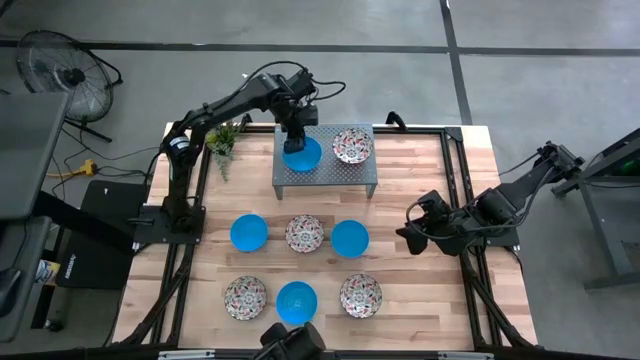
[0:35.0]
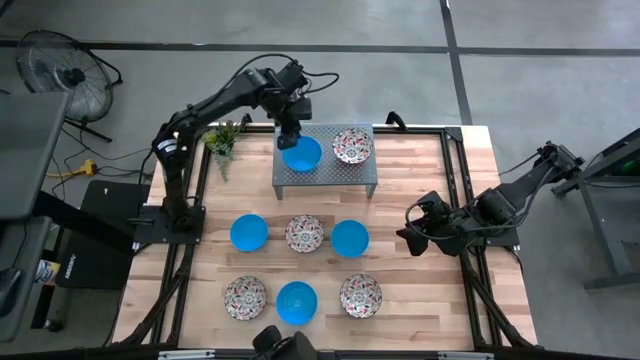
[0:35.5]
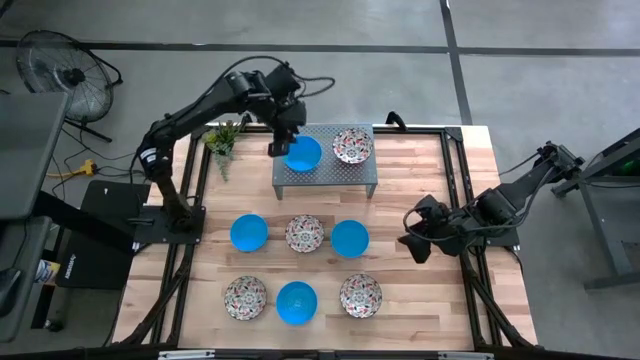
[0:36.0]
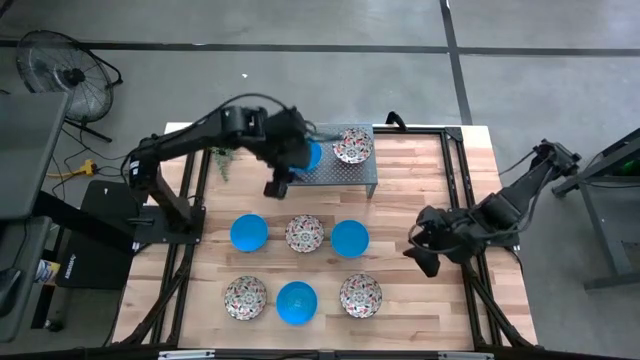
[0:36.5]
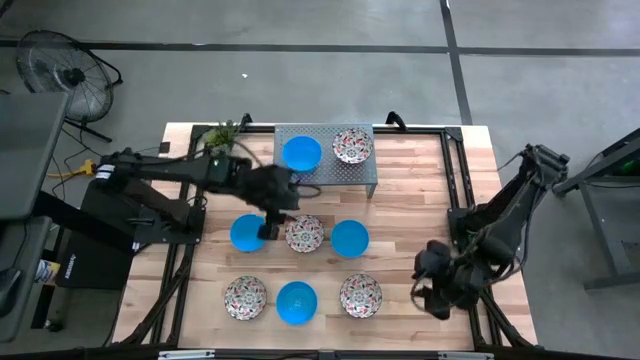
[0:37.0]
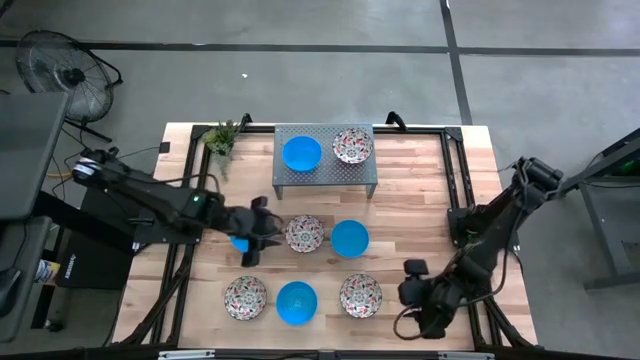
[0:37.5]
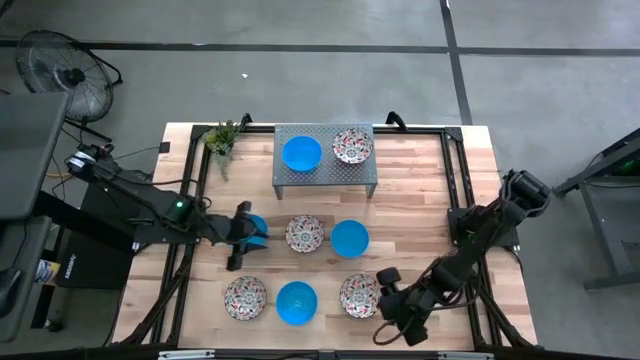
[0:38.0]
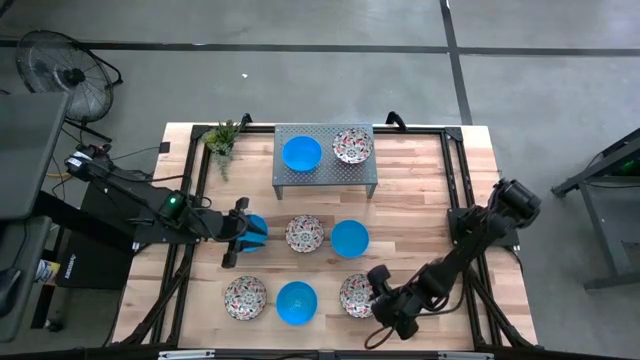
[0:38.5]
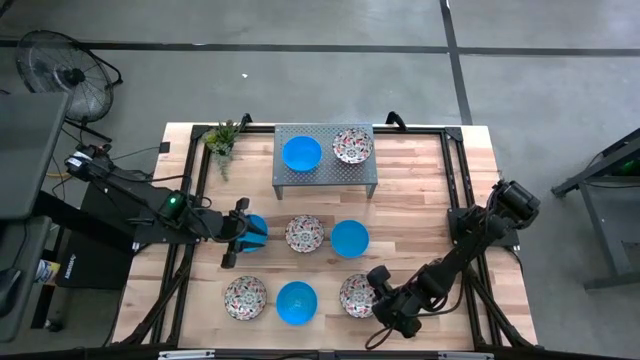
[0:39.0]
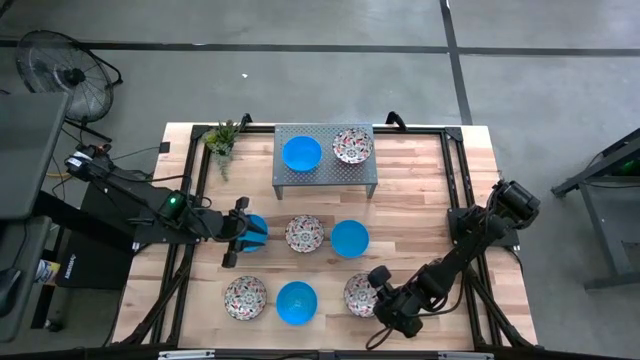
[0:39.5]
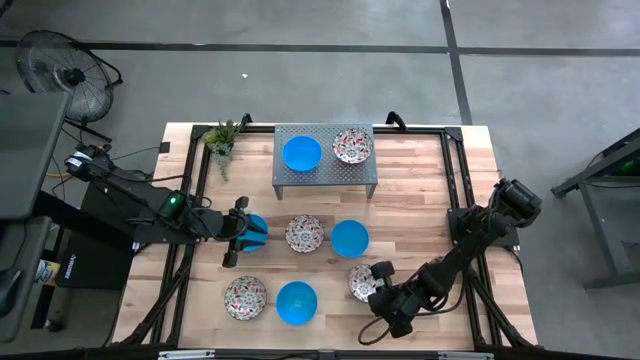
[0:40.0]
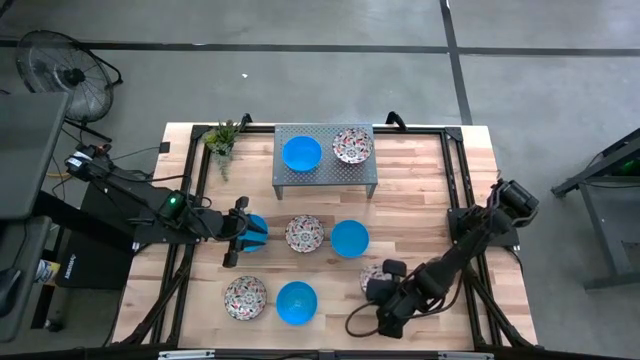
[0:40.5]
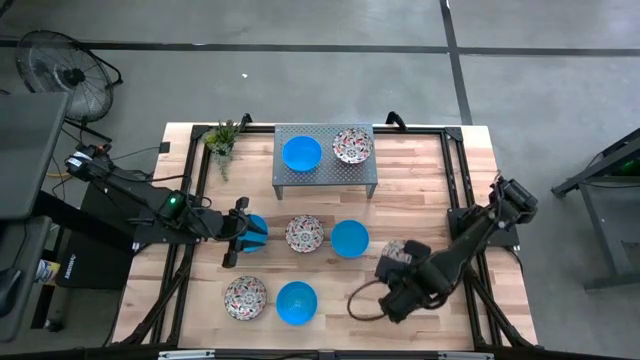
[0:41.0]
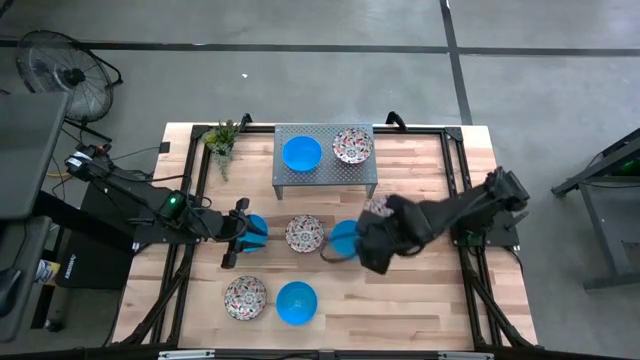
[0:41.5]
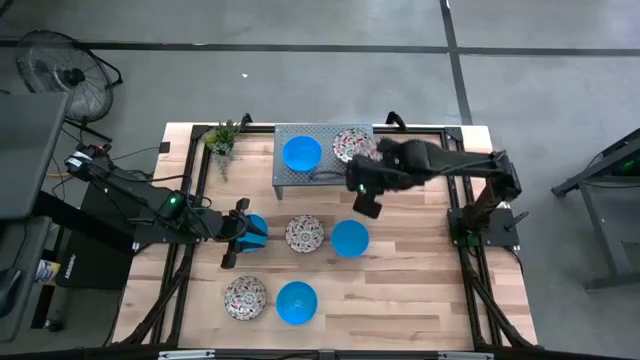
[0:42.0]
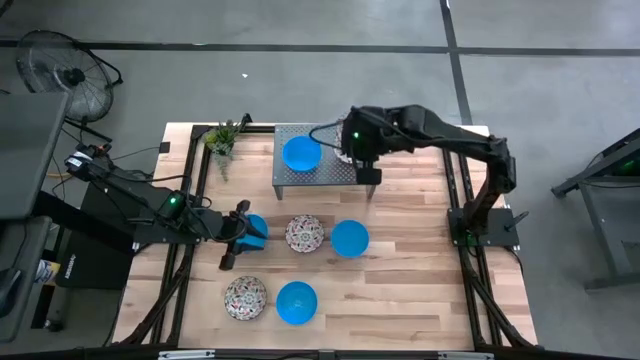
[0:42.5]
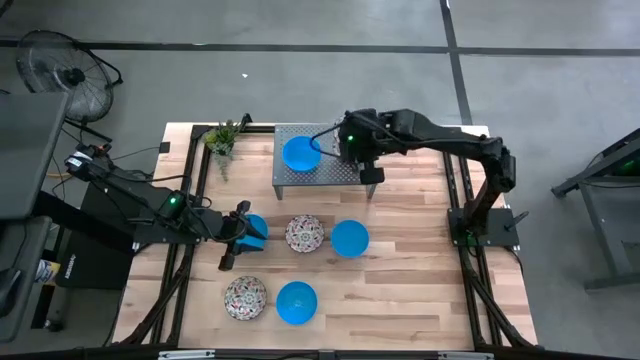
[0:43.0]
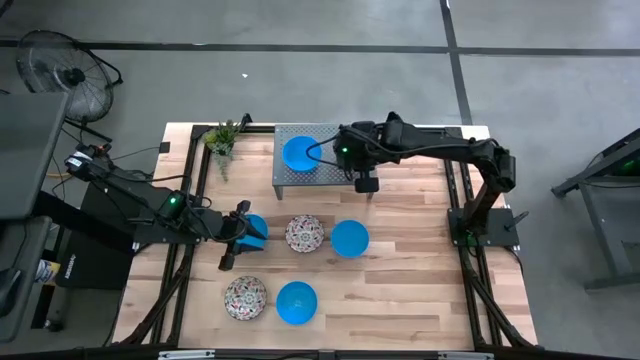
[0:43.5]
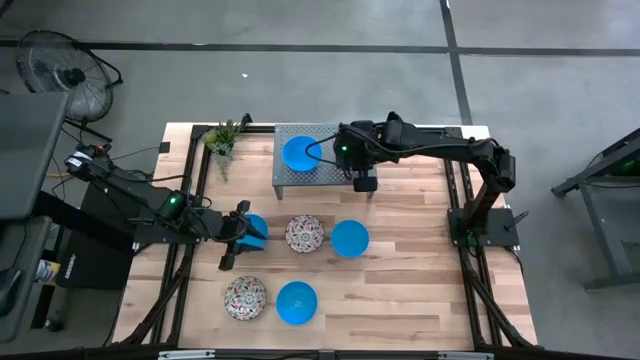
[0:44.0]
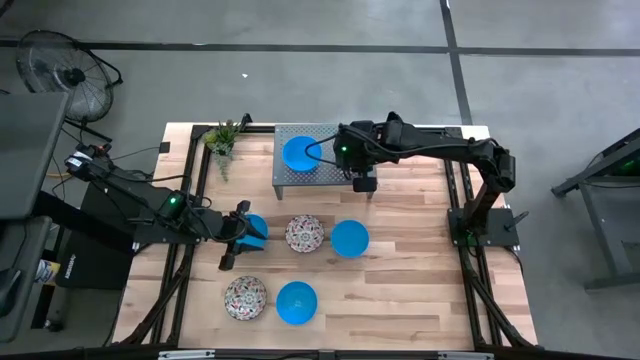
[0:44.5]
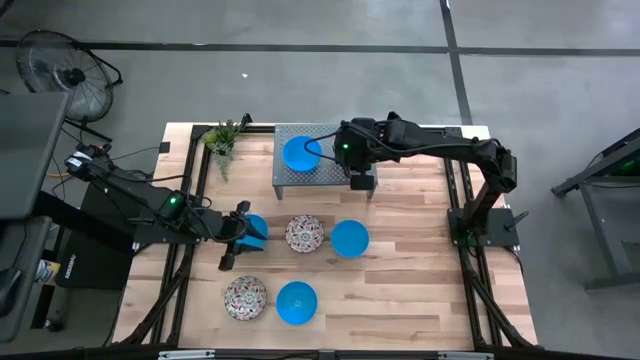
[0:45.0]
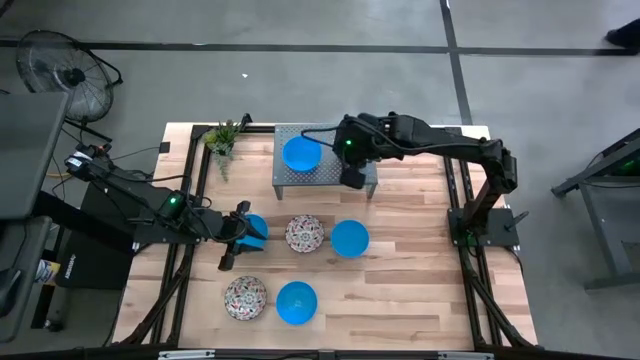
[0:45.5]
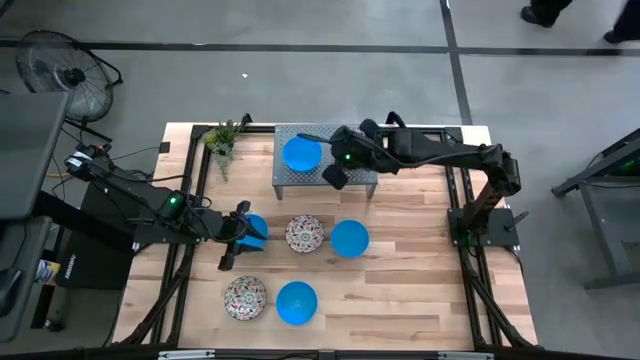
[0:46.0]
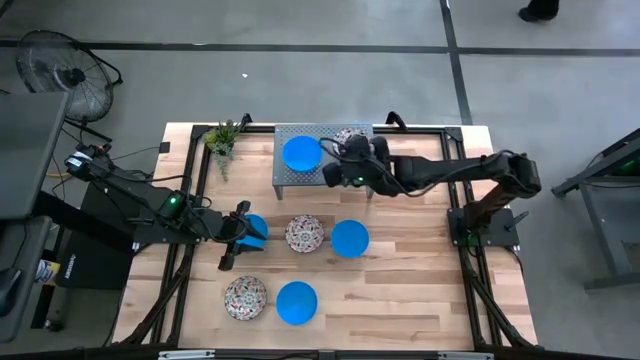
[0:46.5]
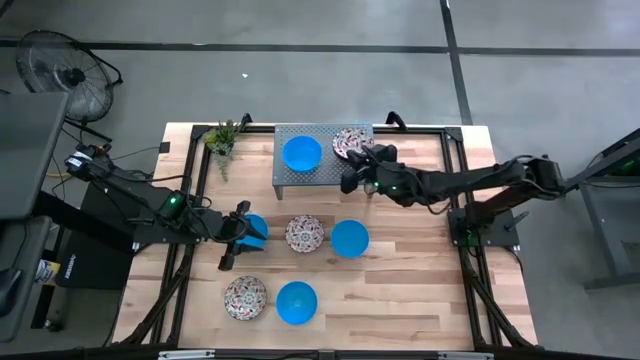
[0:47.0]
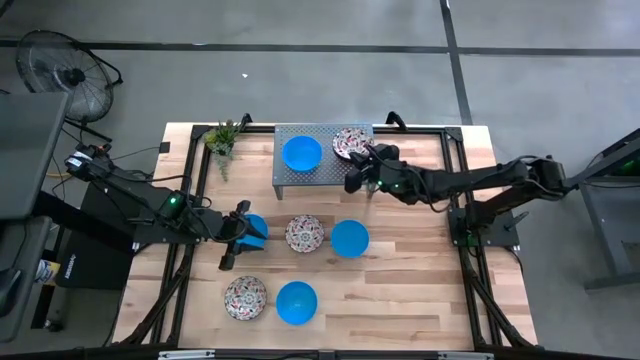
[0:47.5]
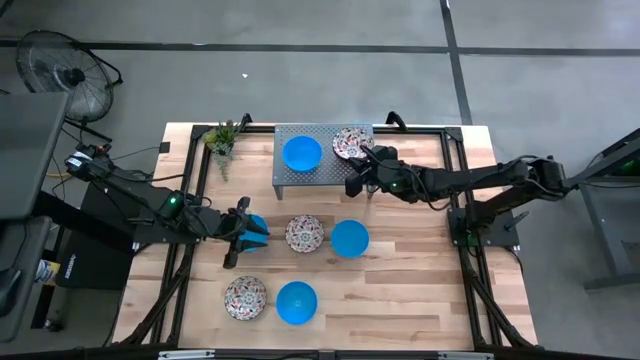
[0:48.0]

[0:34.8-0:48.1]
Task: Pick & Place Mini bowls
Stack the white patterned bowl on top of the other white patterned bowl on the shelf

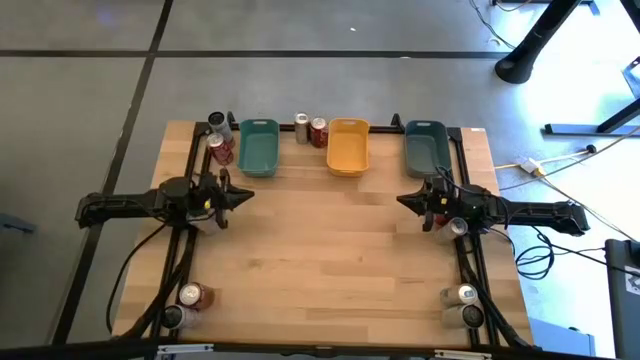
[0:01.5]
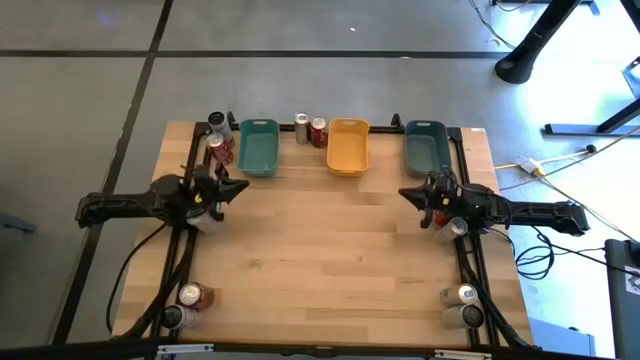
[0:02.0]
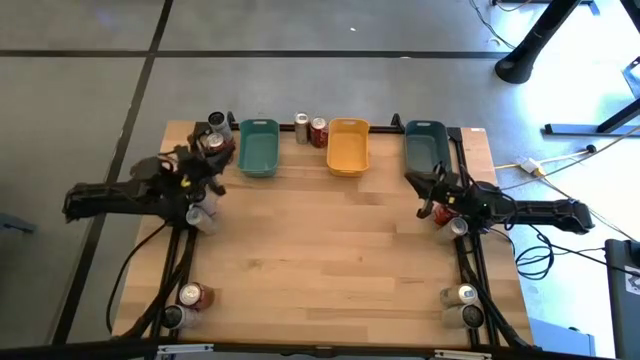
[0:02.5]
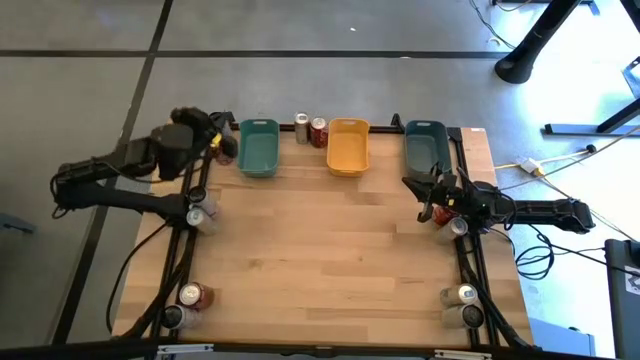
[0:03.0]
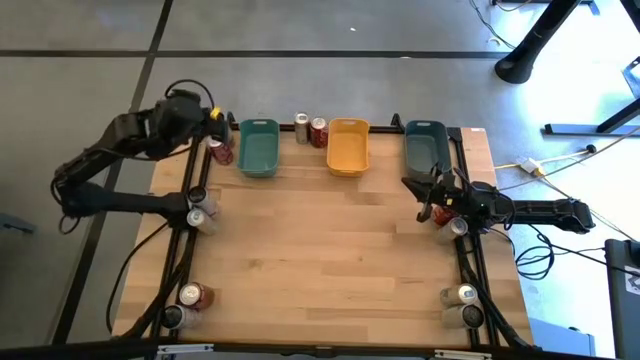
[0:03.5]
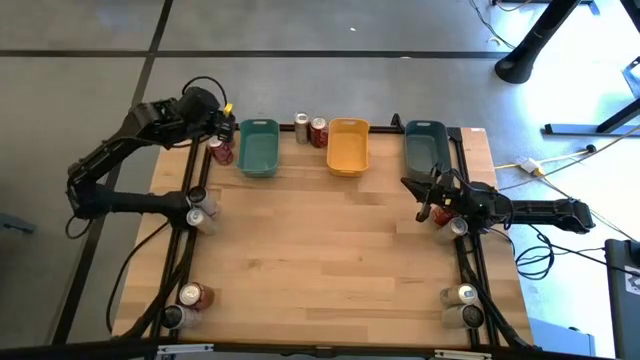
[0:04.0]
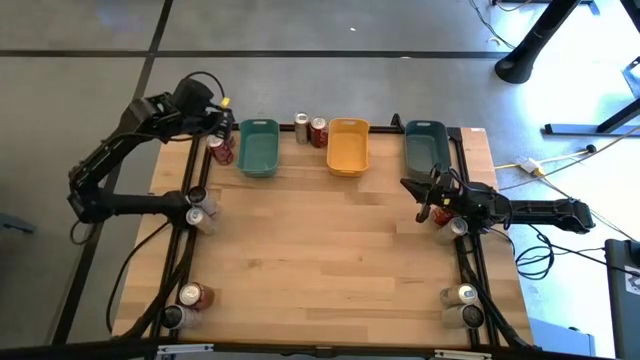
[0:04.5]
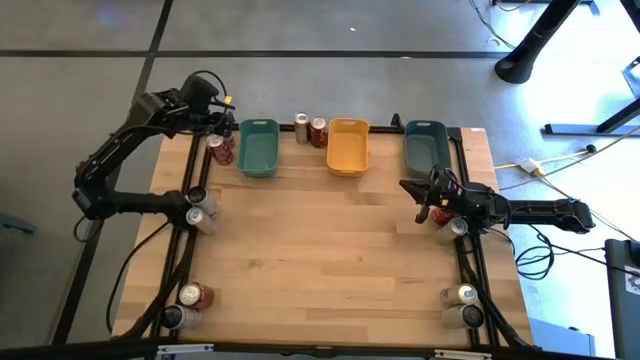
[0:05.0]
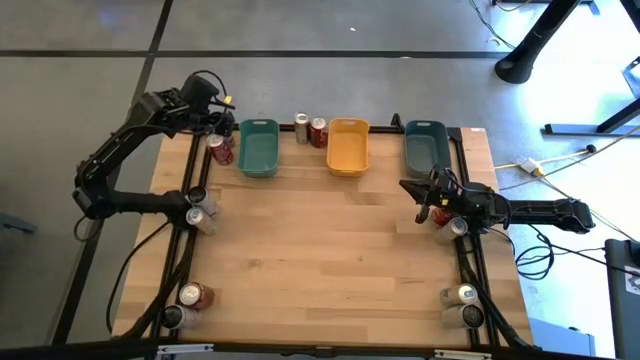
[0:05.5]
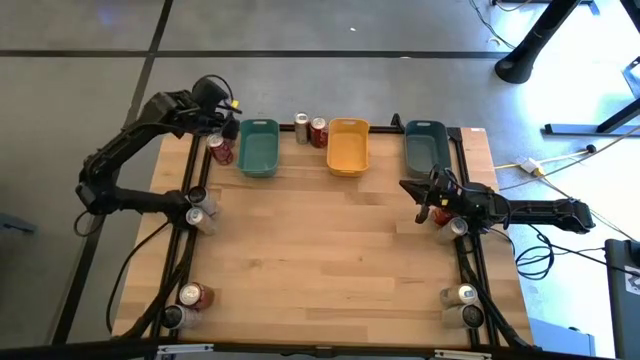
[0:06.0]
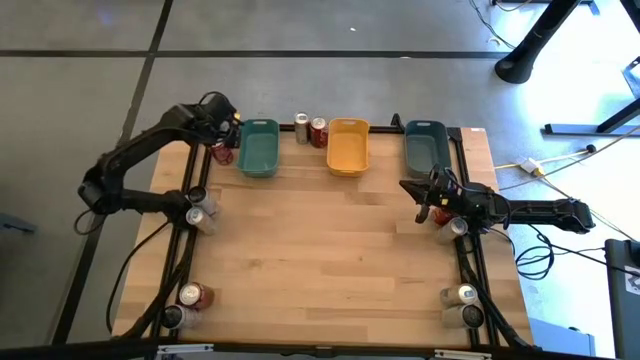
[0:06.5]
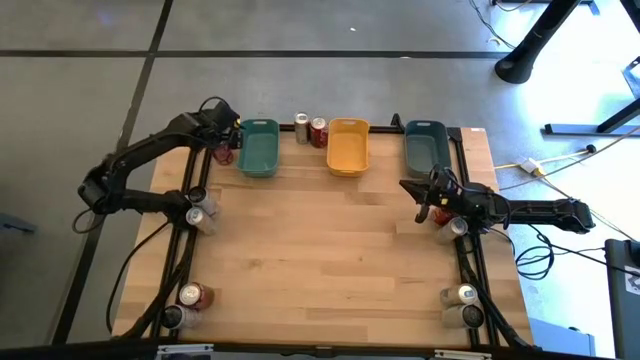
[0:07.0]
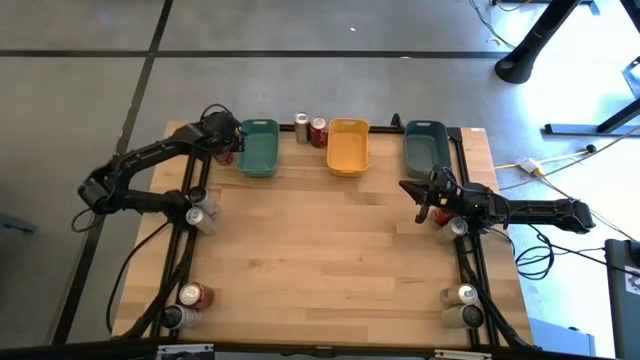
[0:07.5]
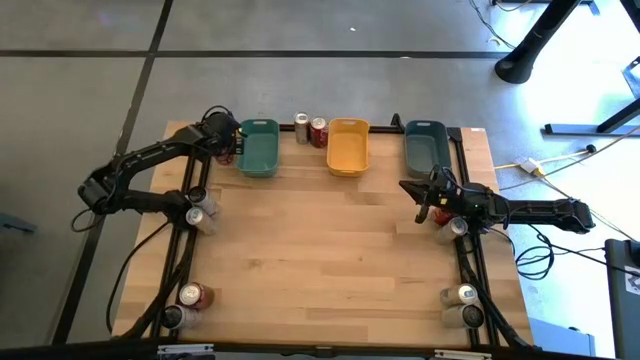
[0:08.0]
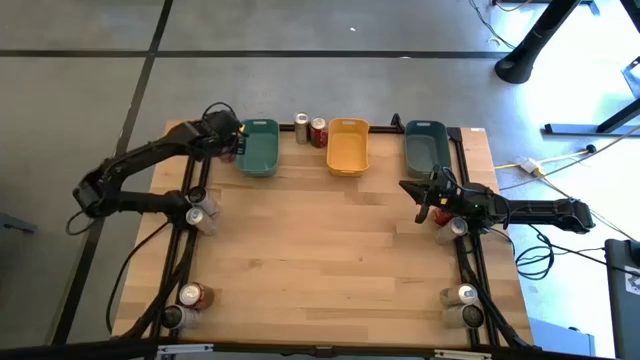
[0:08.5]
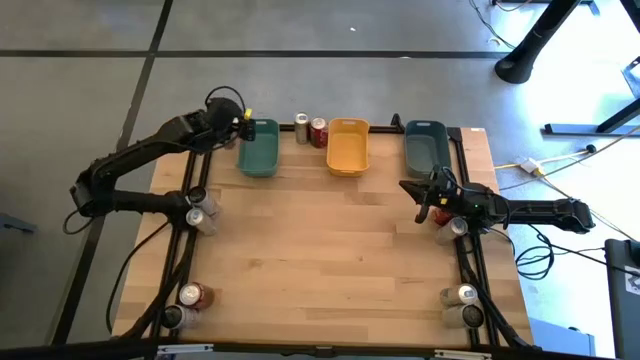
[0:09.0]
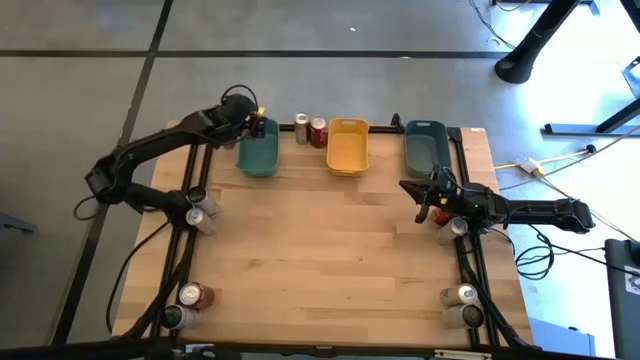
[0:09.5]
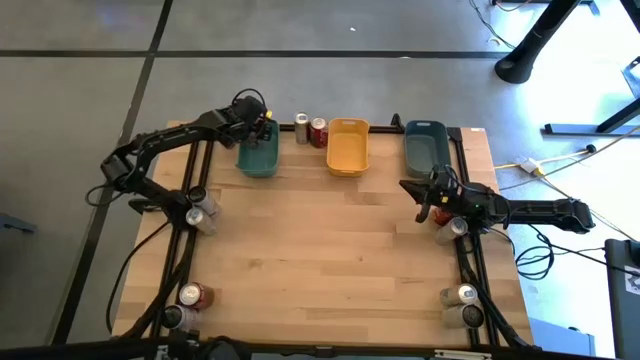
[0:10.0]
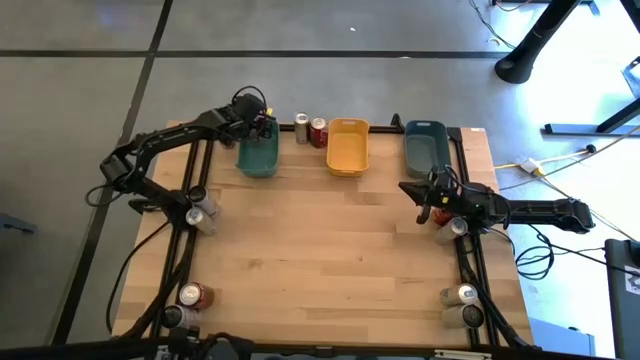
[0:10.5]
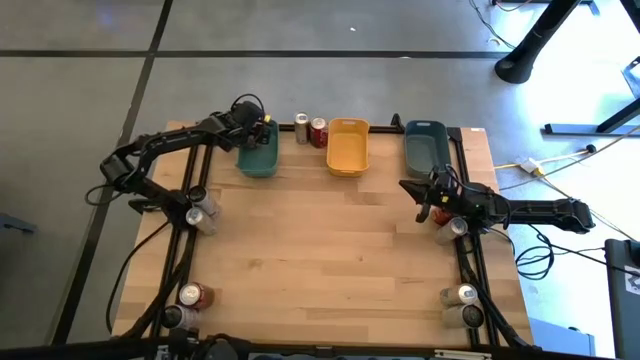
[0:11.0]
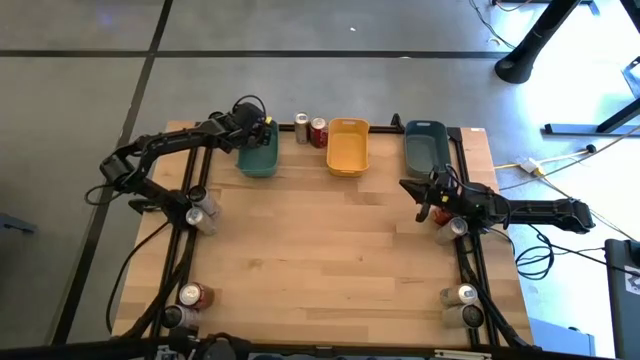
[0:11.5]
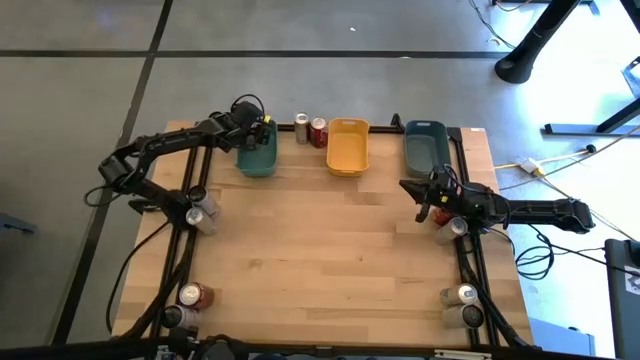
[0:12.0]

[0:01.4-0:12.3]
Task: Sort soda cans
Put the top left red soda can into the green bin
